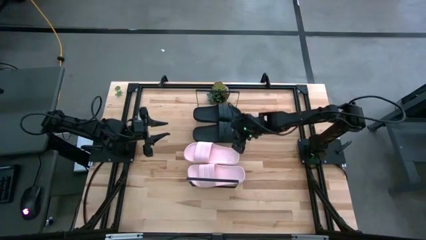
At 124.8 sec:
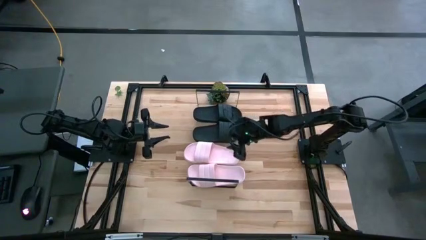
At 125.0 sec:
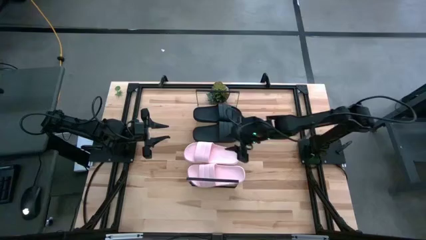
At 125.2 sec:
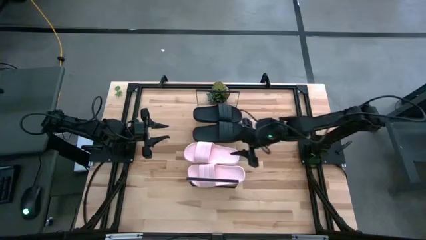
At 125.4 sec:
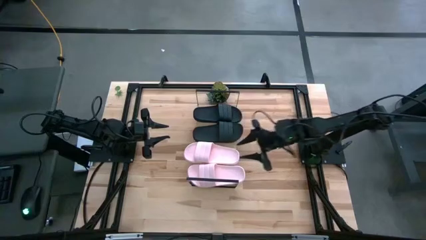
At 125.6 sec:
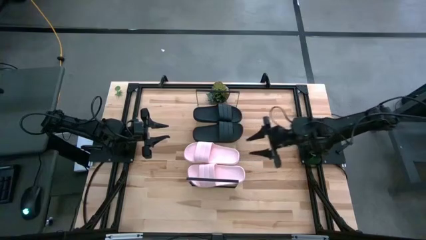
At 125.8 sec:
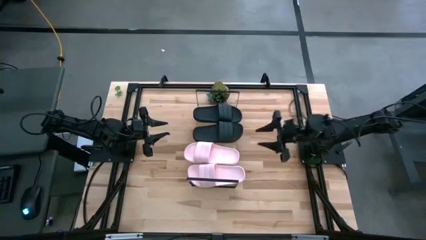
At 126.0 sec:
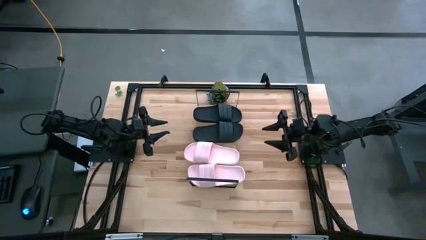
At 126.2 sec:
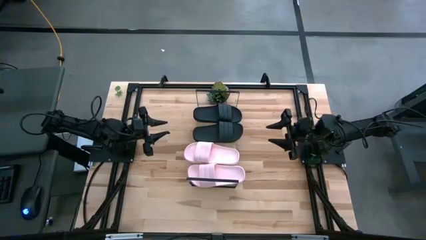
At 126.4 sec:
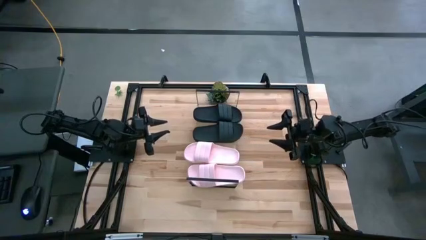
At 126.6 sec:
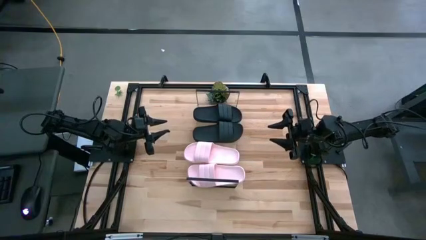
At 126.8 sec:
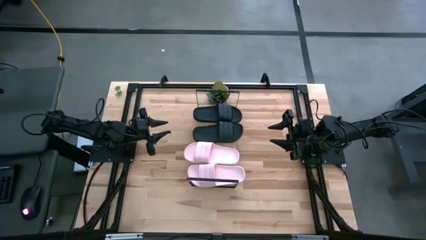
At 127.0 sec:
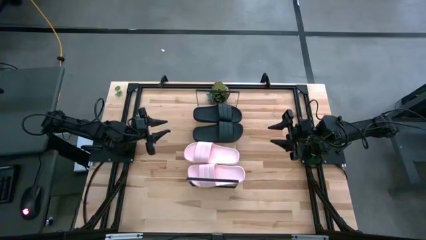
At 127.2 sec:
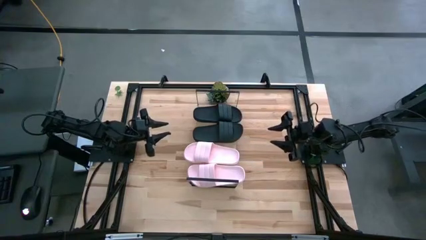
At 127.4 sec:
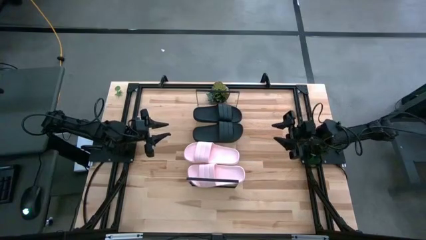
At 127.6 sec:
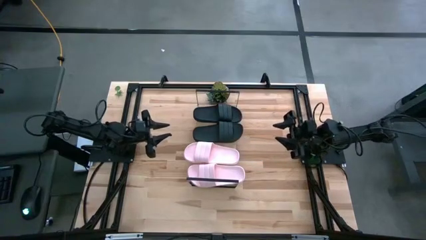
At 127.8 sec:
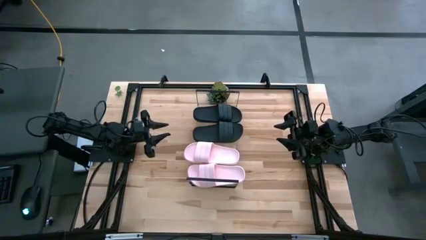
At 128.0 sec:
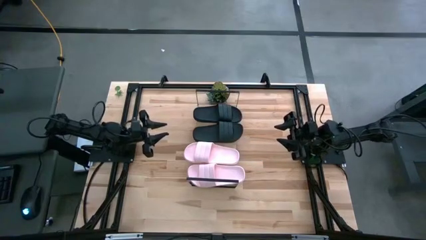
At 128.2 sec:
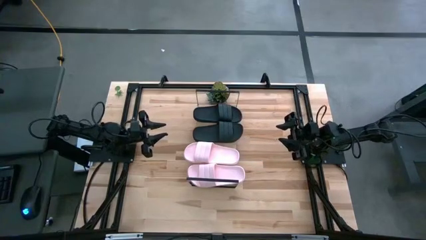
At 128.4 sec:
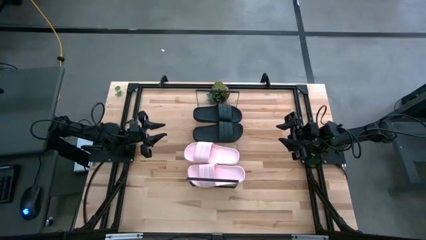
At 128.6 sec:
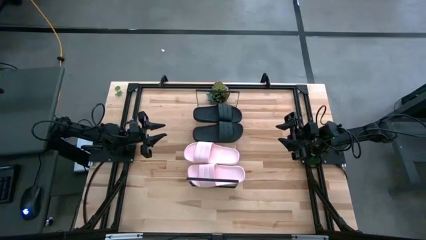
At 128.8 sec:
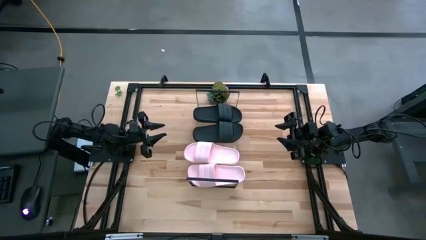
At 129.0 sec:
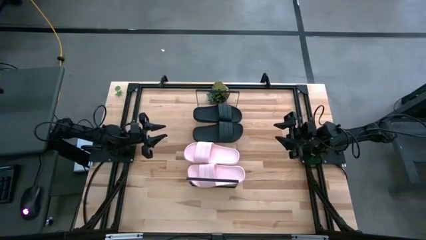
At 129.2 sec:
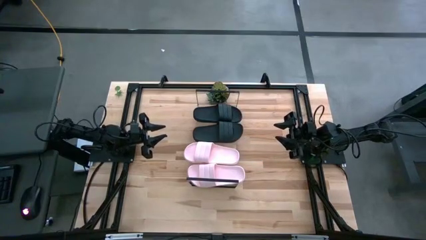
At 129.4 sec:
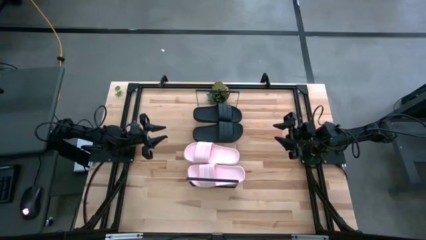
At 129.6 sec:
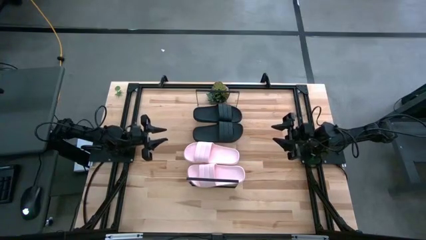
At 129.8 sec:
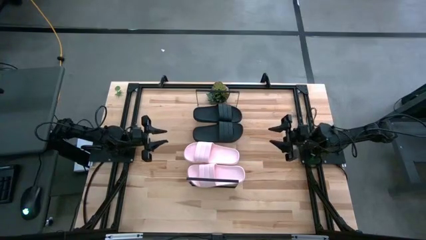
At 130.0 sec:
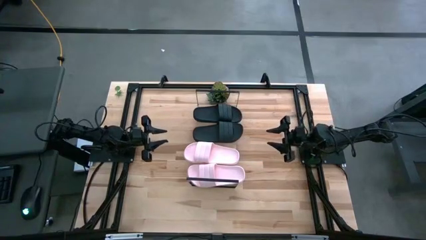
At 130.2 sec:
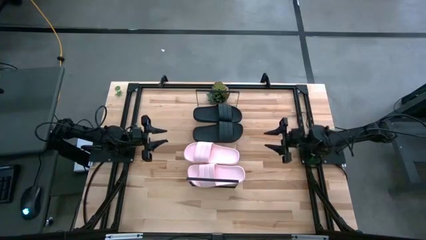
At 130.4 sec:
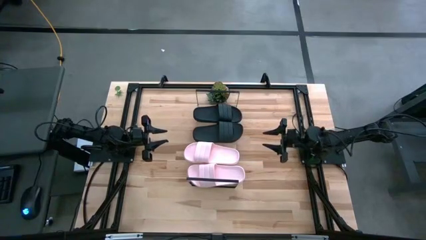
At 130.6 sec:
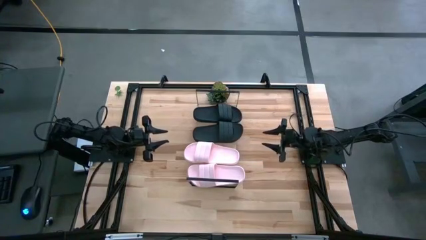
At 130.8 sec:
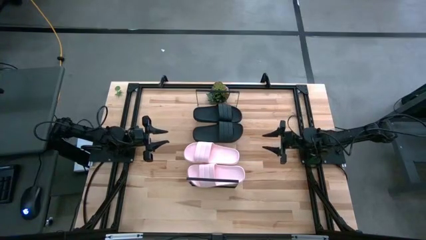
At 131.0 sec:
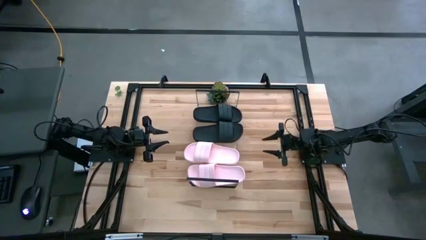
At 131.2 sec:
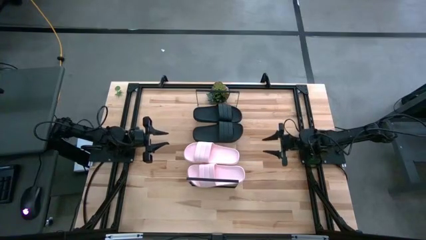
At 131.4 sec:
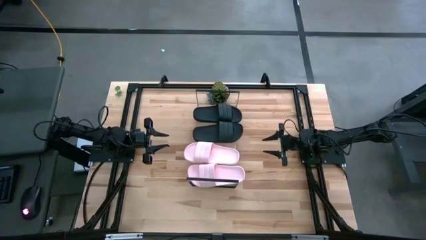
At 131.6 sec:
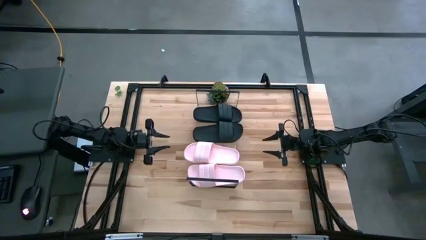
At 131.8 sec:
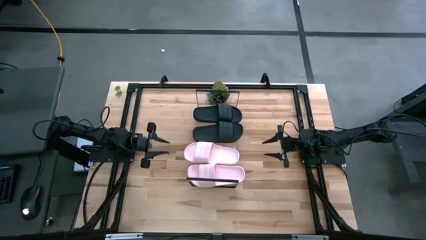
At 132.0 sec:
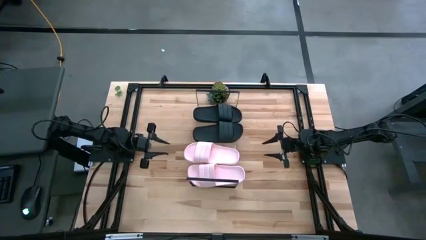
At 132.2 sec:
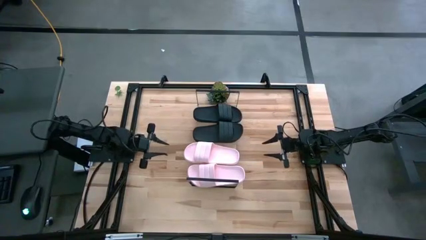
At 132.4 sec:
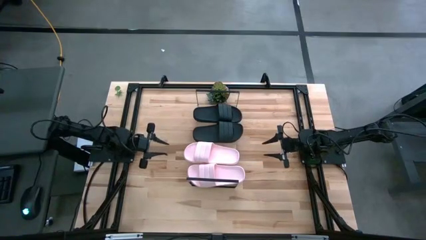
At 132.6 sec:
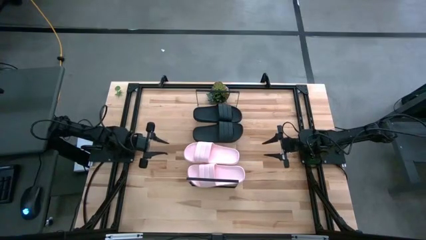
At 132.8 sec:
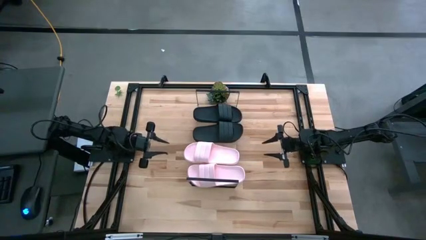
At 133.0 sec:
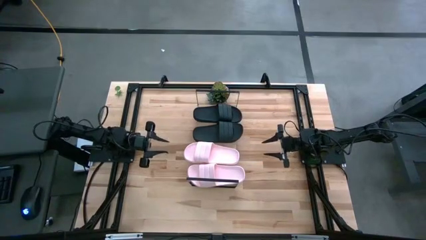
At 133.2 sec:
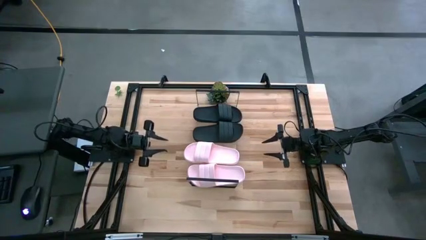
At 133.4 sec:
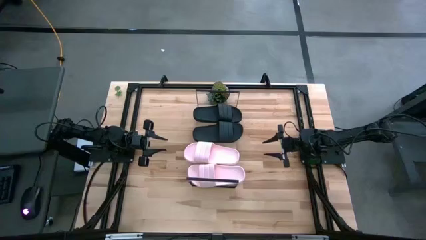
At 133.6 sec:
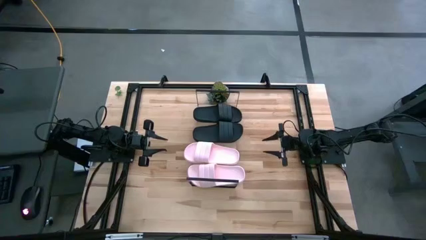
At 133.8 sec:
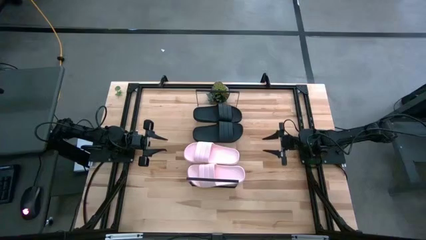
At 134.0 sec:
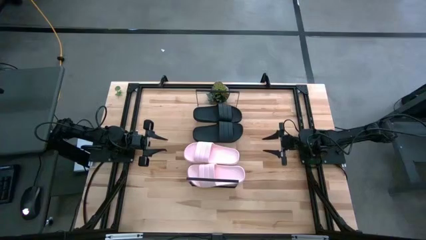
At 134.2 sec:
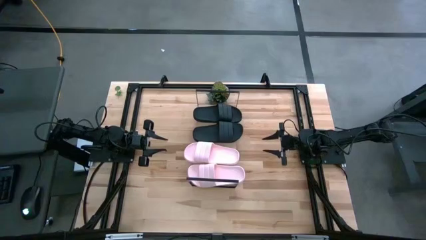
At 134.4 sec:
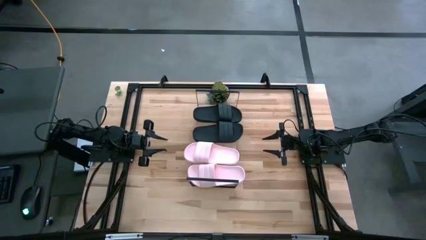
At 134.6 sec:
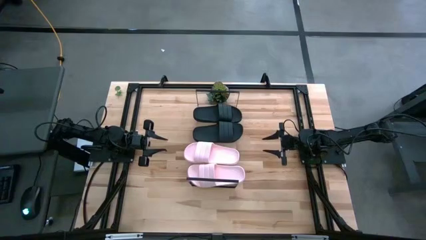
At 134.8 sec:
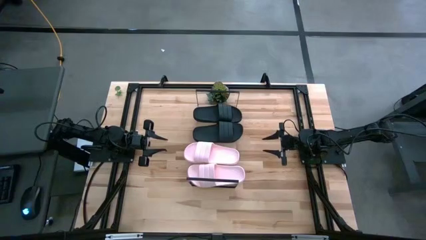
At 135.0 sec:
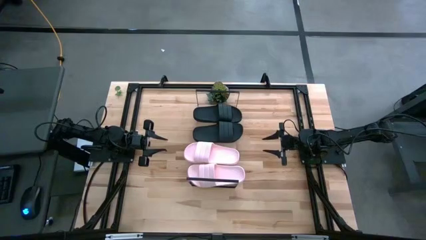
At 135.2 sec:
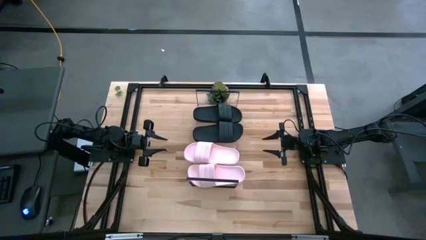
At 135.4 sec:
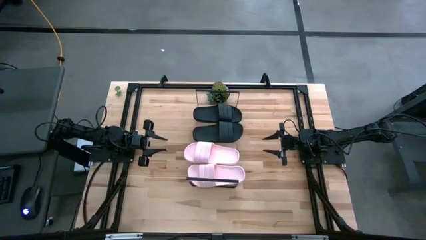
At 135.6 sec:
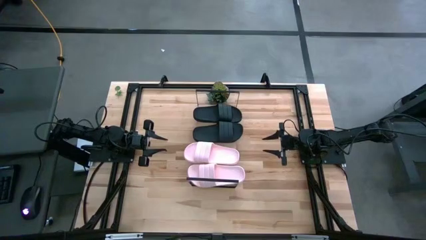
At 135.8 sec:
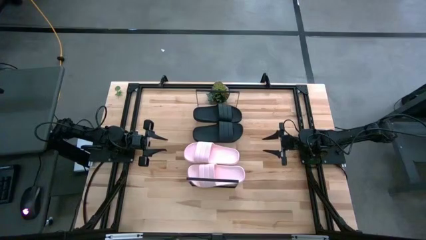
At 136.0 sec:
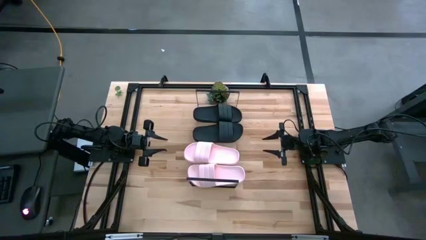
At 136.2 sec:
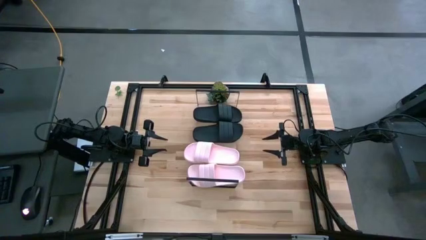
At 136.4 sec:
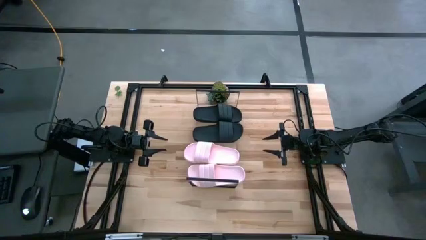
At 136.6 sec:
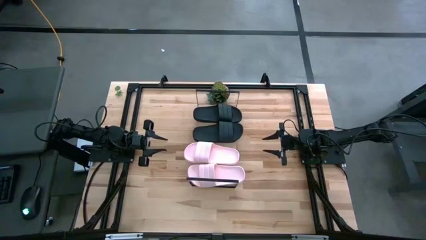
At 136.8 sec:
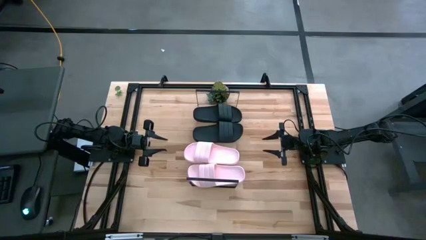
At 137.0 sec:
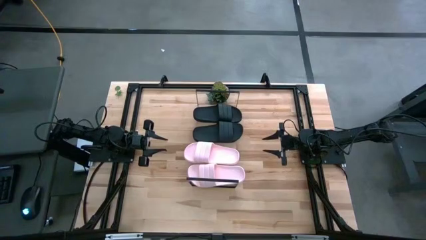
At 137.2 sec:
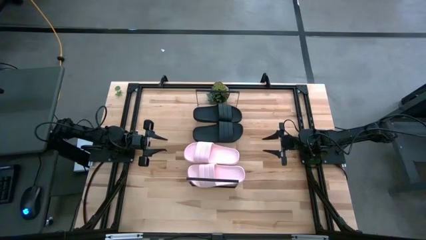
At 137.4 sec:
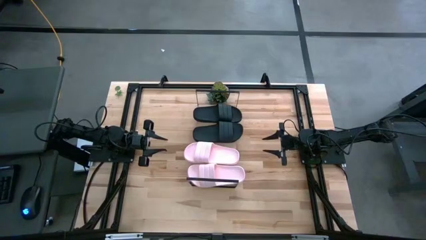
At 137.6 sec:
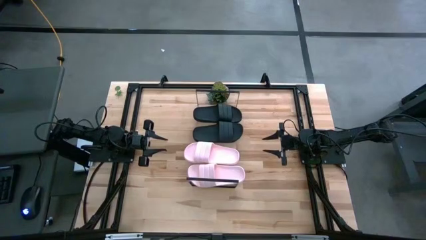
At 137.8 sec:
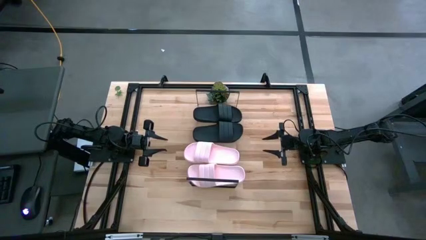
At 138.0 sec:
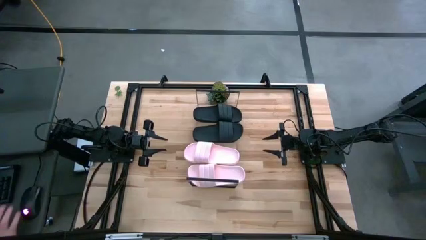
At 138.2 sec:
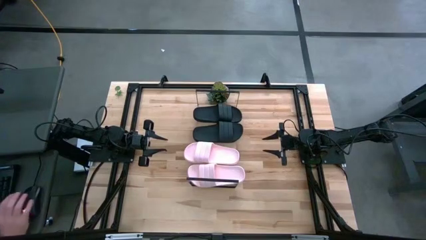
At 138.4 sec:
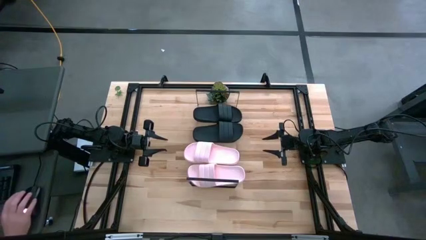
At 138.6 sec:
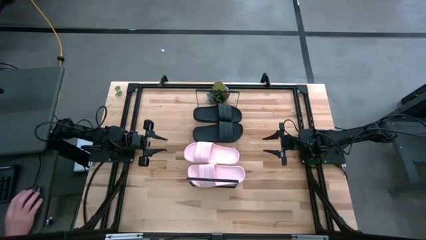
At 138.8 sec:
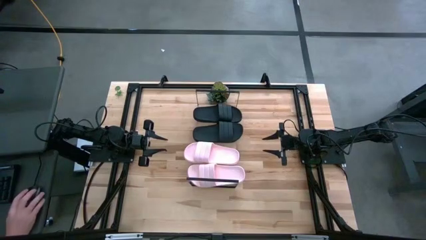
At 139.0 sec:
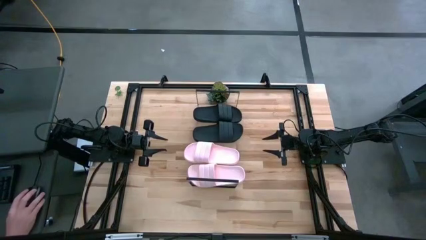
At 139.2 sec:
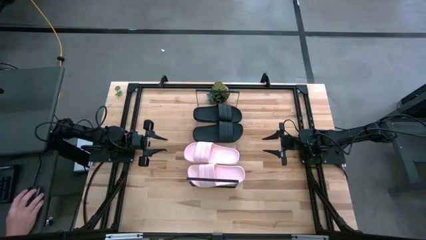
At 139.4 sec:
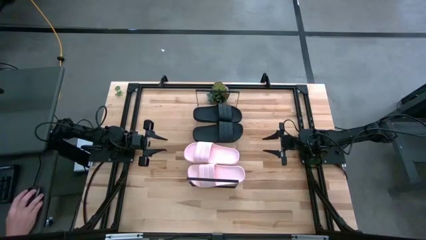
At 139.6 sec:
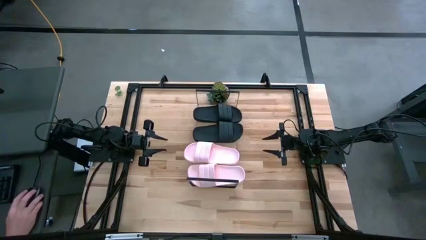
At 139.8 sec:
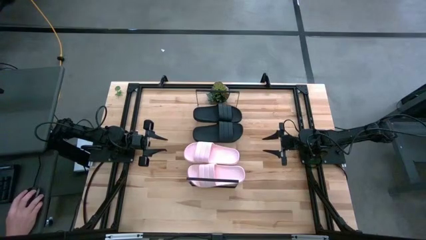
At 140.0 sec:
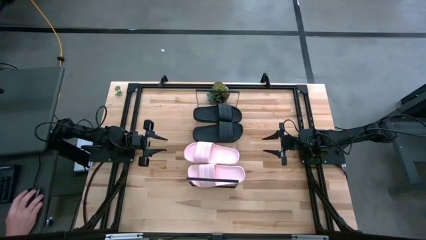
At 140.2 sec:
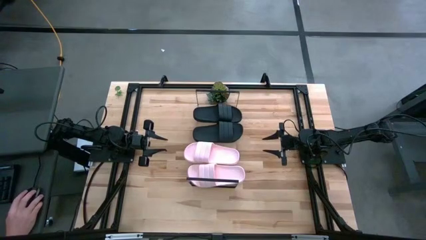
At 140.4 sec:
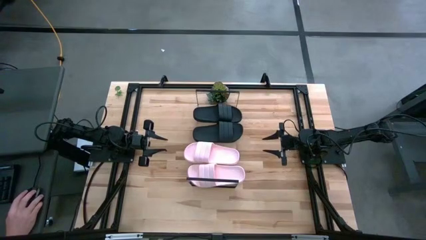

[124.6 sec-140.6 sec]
Task: Pick and place slides into the shelf
Return to Home Position
